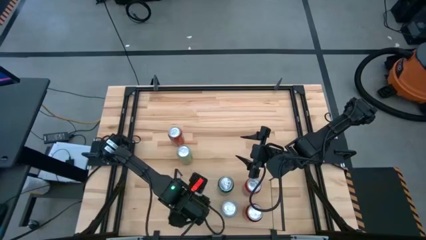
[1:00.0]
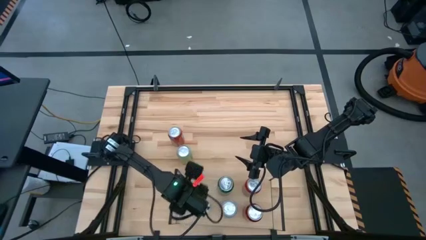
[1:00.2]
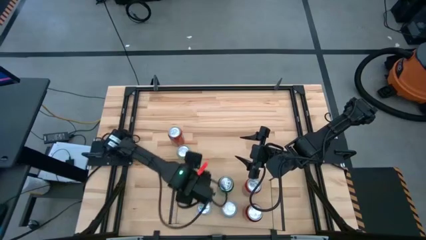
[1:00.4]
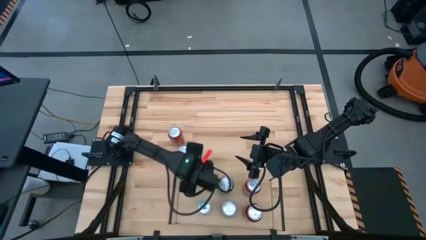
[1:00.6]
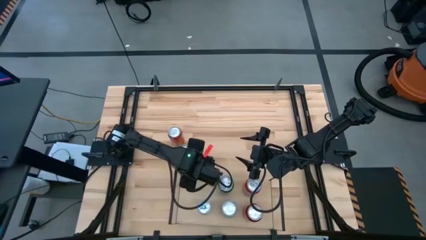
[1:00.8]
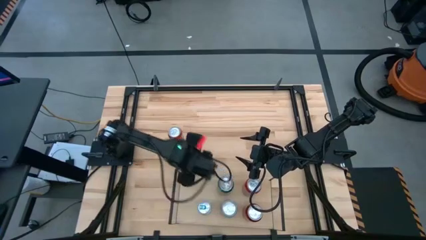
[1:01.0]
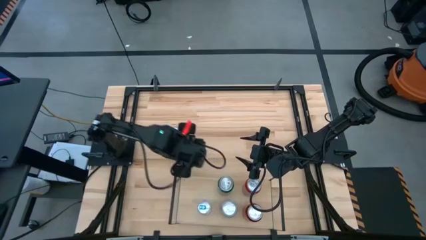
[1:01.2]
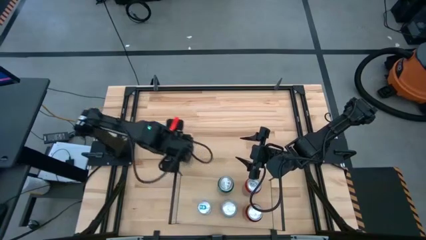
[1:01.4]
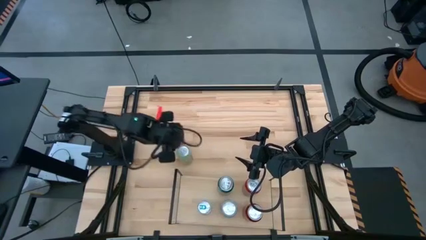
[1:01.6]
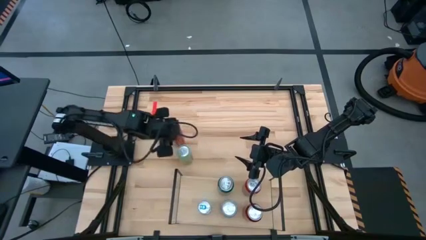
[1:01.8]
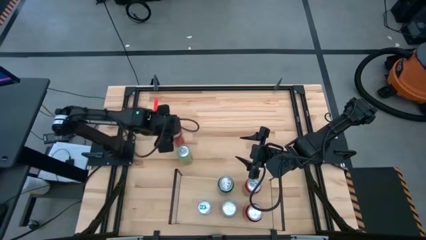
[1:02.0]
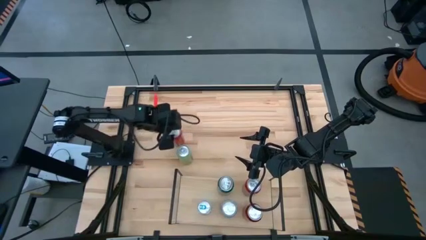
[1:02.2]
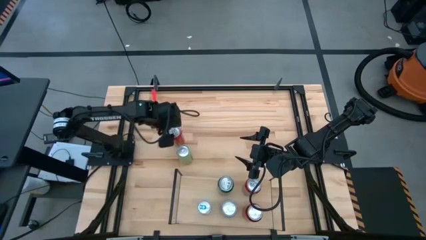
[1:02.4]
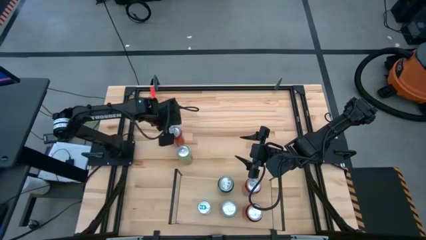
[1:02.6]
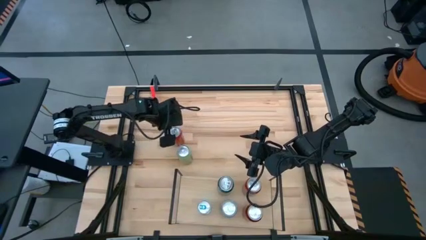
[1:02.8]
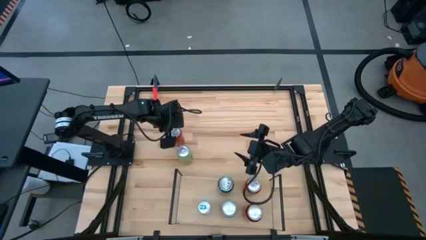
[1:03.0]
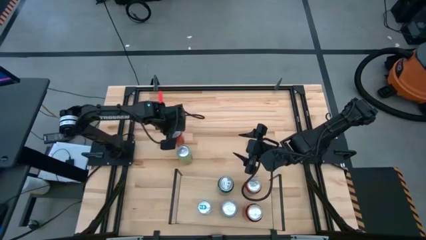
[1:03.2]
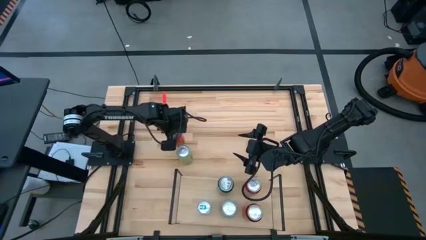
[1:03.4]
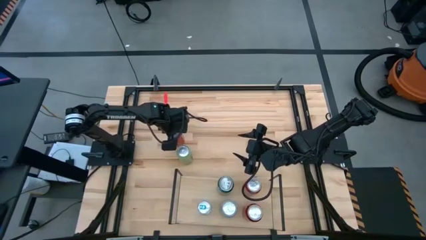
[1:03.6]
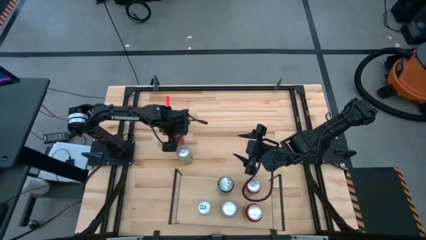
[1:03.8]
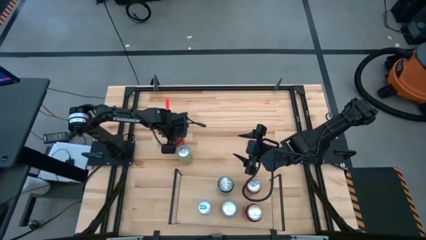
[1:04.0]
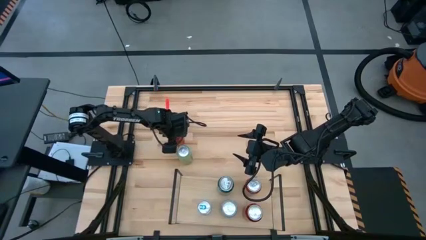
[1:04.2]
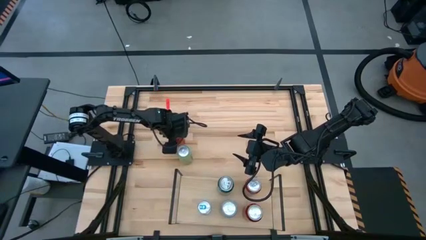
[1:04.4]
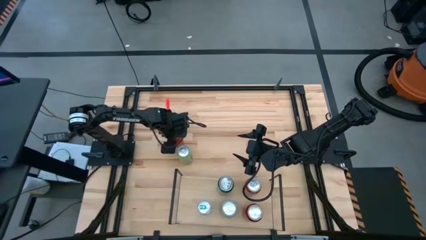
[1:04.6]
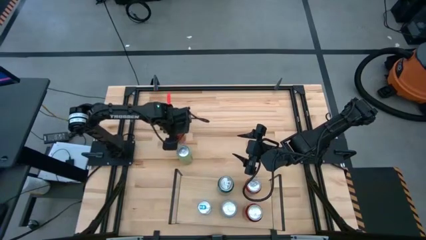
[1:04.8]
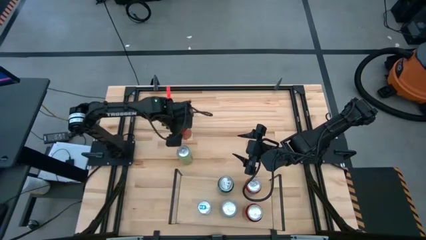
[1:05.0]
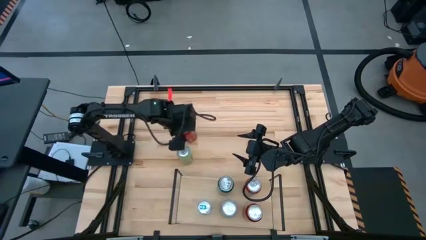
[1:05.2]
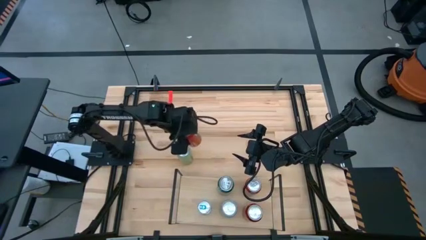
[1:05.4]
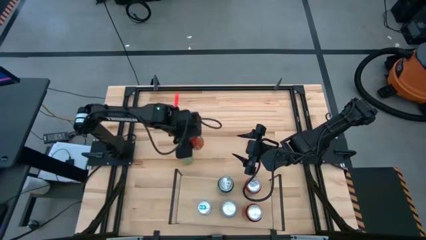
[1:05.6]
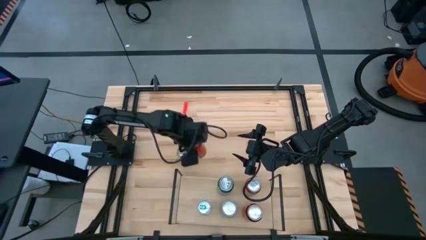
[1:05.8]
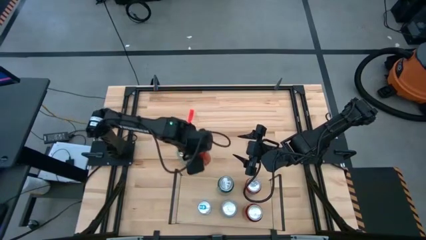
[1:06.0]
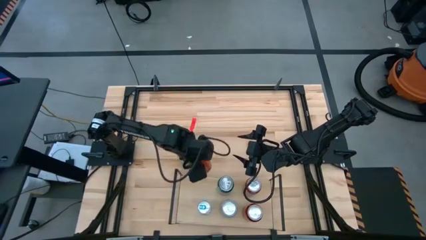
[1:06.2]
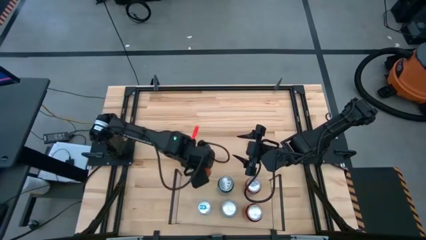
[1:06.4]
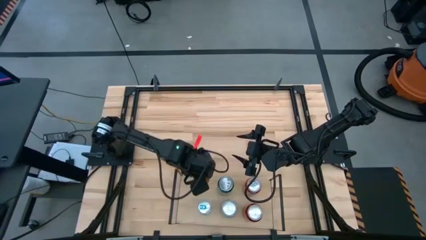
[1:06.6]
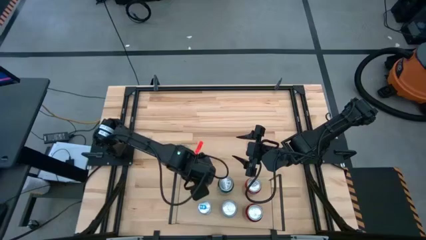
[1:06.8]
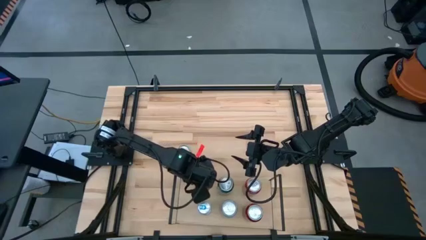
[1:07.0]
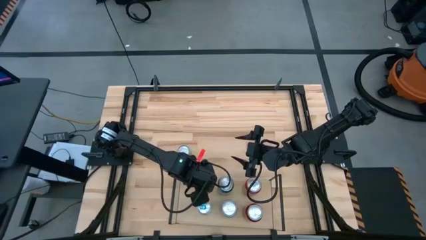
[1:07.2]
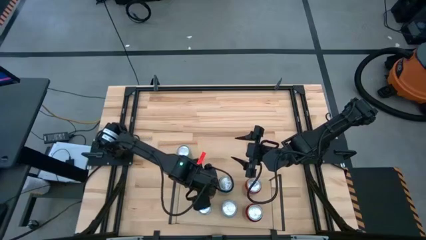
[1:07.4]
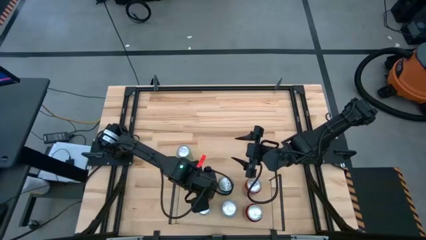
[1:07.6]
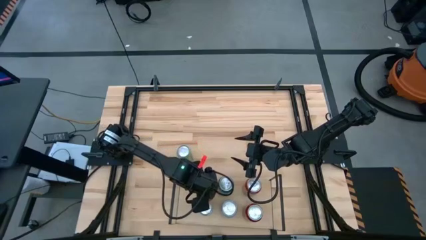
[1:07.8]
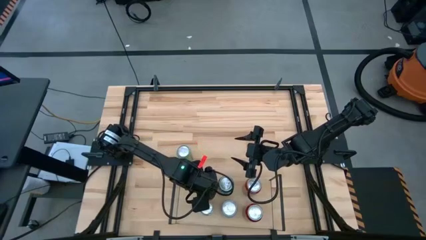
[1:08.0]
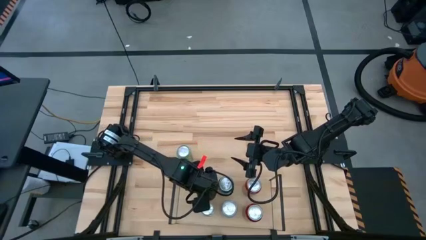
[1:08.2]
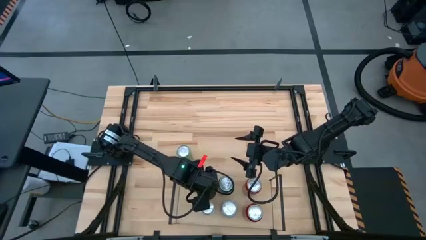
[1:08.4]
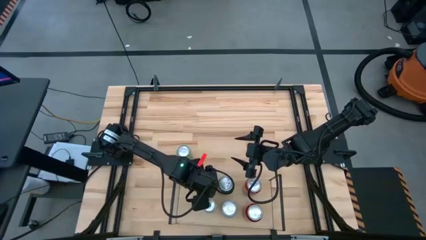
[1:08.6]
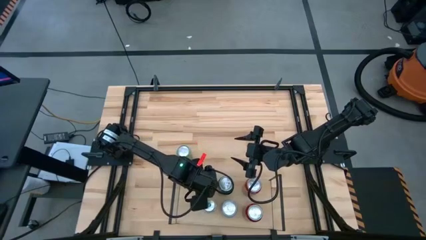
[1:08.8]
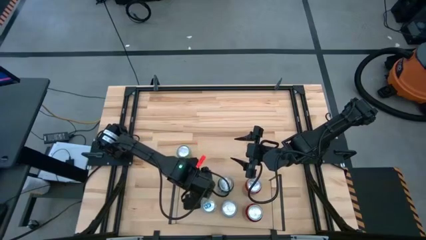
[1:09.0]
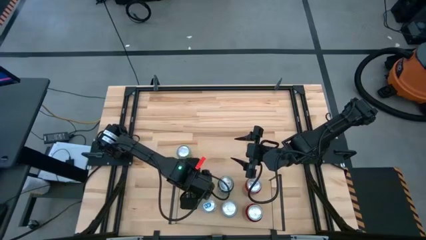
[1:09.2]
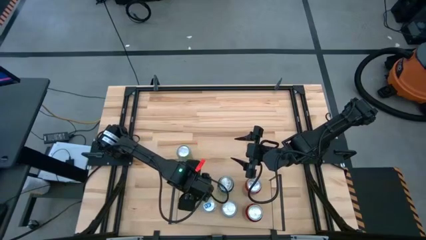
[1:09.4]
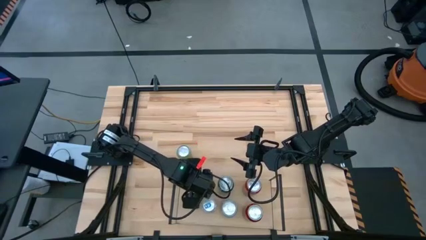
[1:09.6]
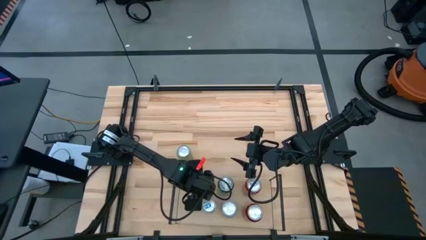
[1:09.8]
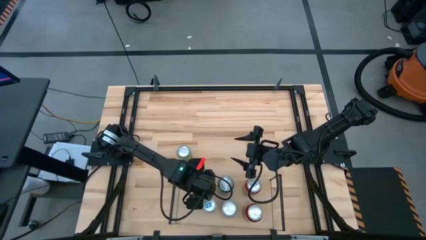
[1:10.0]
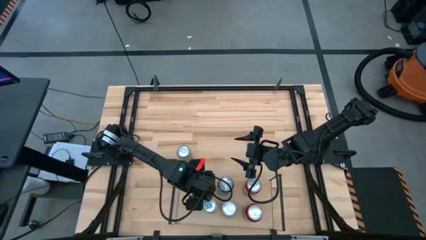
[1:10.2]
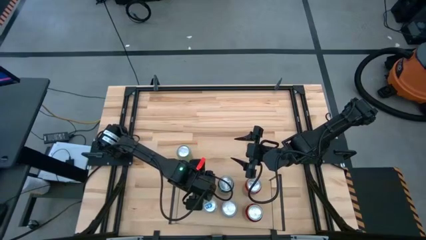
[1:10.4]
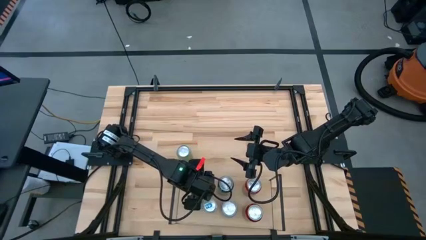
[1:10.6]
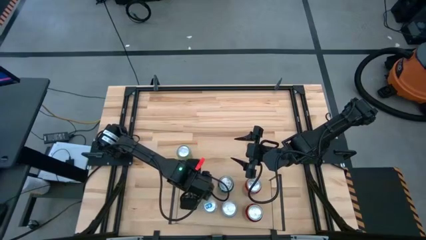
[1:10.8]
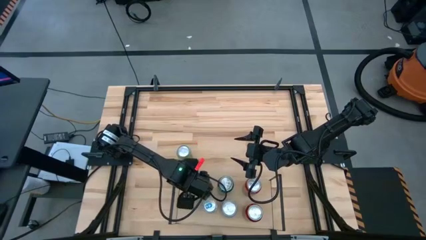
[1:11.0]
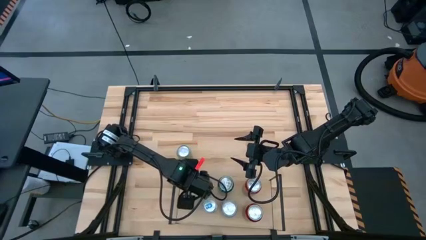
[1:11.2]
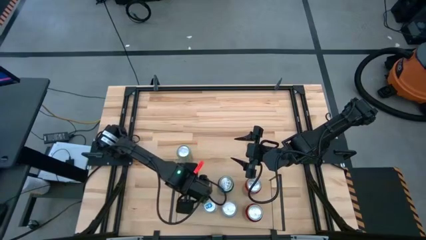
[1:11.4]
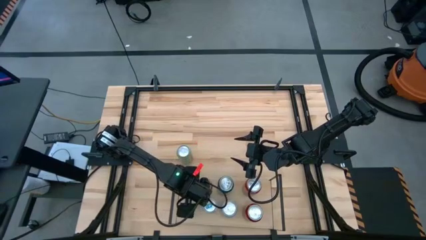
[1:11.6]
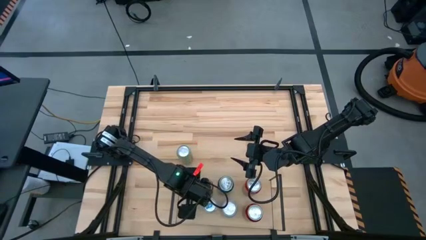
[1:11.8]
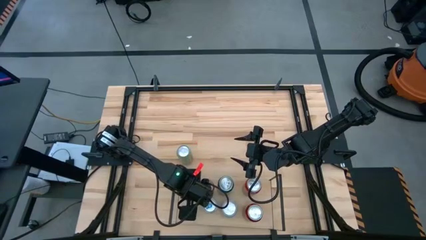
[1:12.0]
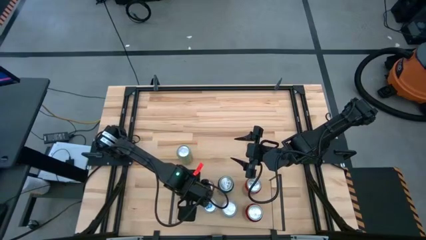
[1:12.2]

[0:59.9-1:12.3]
Task: Place canned beverage on shelf
Put the orange can on the shelf

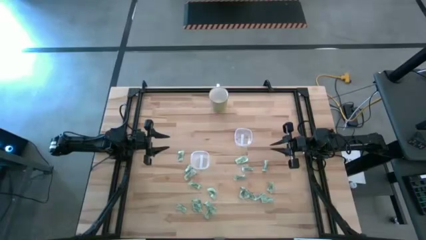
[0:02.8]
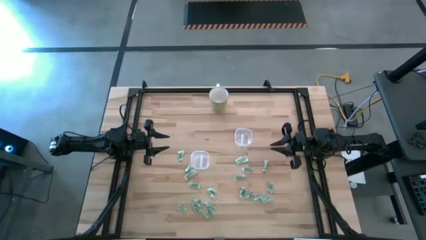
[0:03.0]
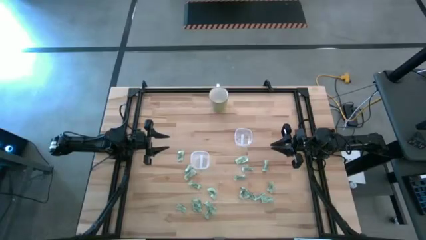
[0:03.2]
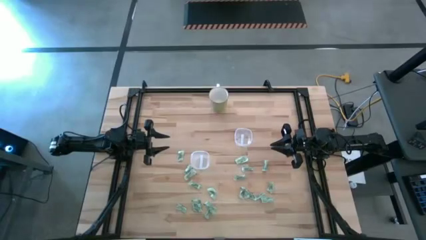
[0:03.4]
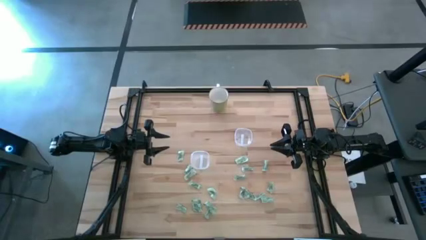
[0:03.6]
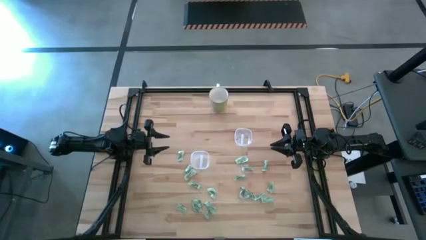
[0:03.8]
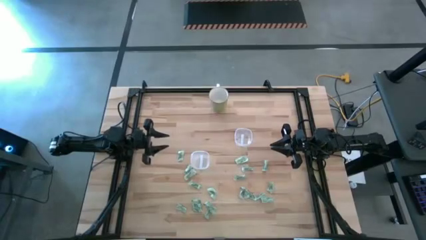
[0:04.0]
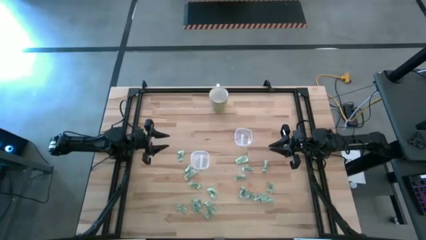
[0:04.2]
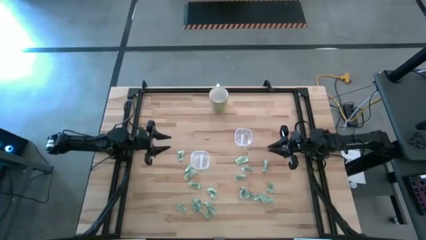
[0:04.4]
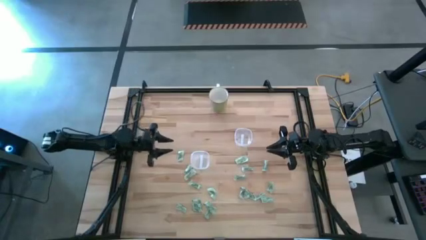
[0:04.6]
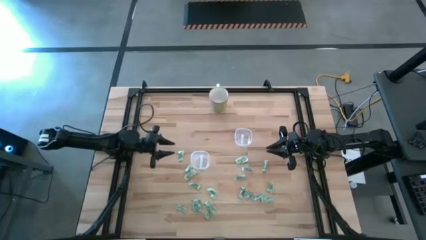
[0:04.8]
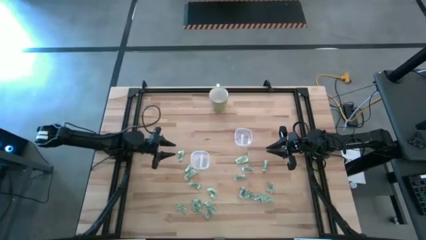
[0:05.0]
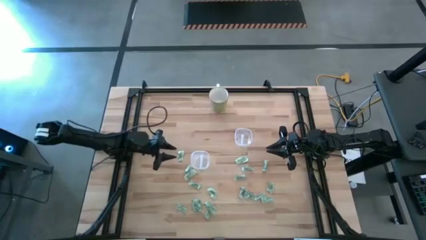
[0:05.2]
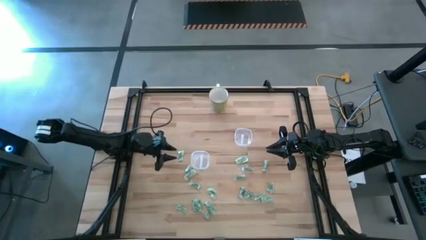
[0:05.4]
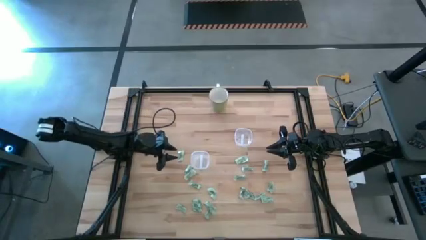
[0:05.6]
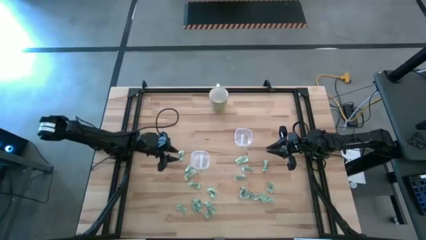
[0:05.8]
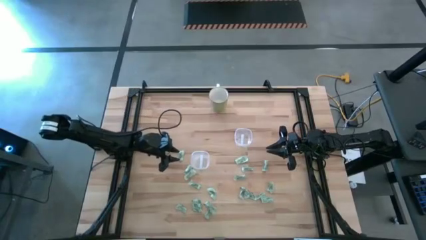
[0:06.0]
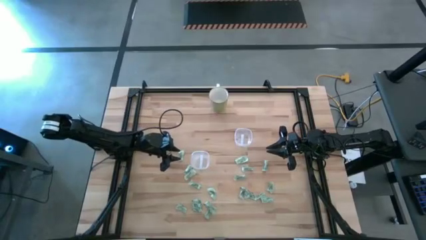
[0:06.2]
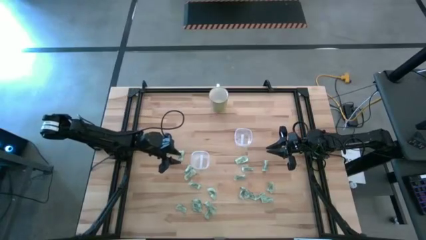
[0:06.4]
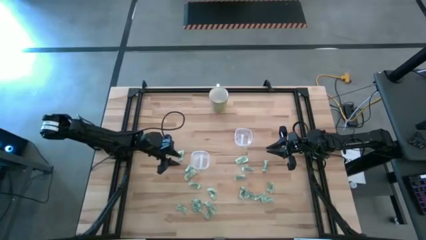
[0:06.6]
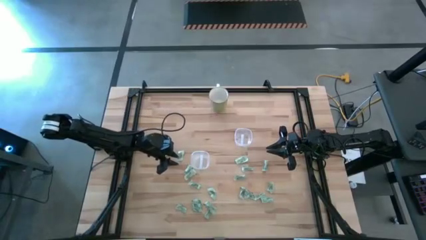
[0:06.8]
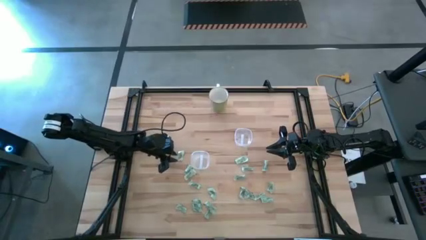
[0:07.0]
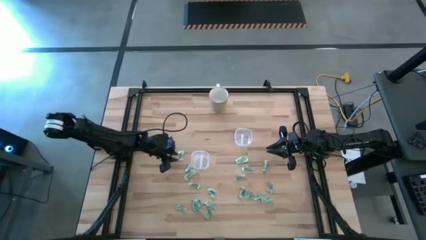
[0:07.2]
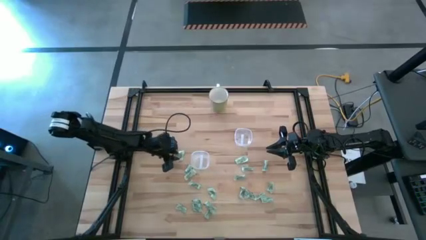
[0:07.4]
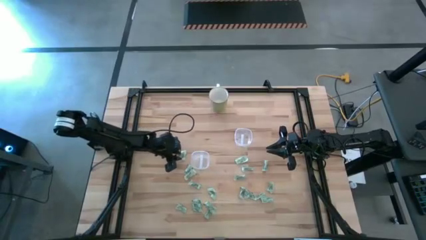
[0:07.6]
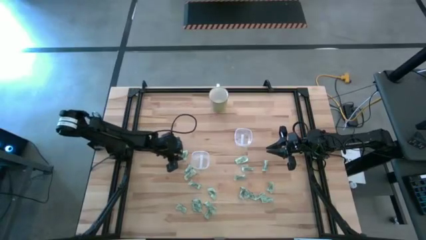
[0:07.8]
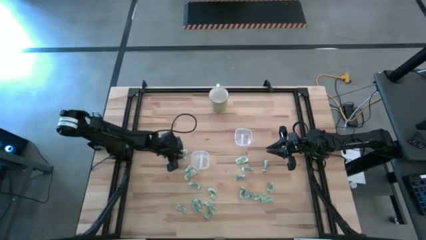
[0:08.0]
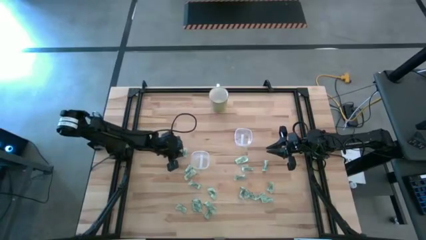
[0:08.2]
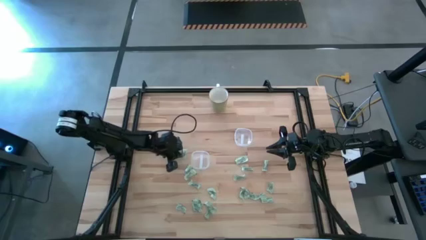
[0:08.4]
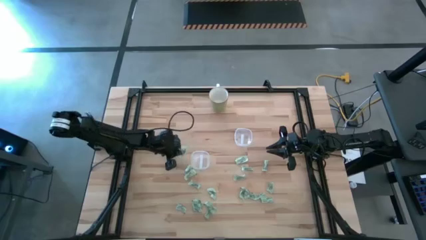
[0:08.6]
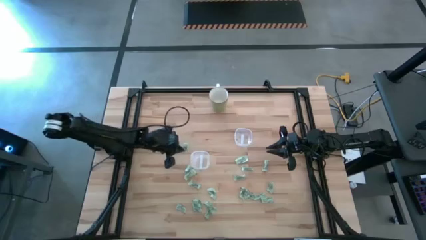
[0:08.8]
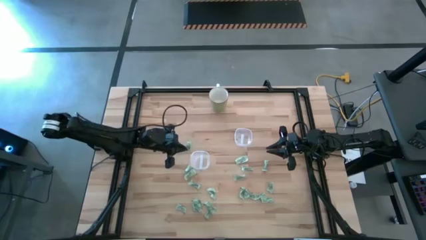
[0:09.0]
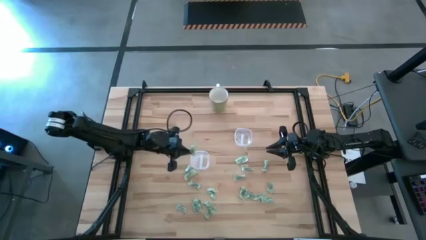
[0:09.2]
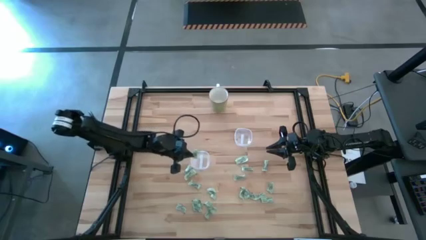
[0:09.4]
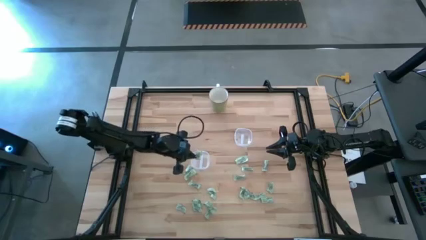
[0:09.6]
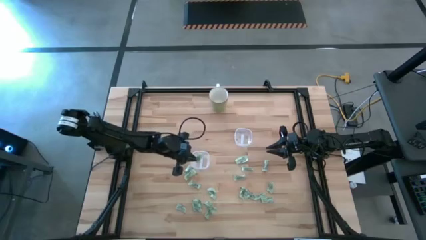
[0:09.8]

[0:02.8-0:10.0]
Task: Pick and place Stevia / Truvia into bins
Put the green stevia packet into the left transparent container
